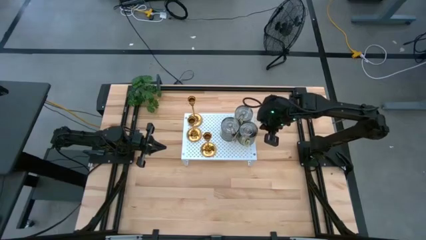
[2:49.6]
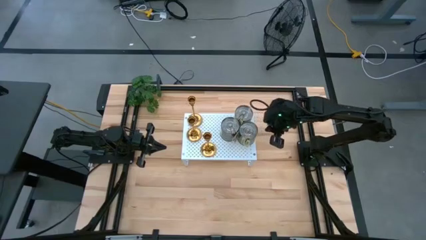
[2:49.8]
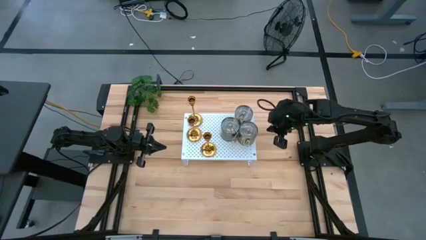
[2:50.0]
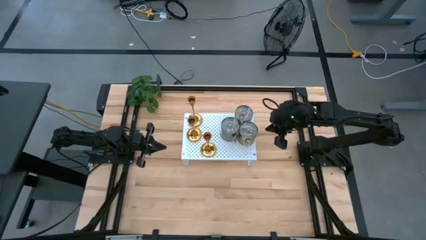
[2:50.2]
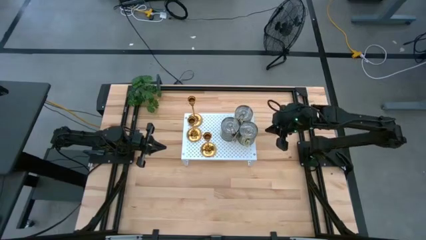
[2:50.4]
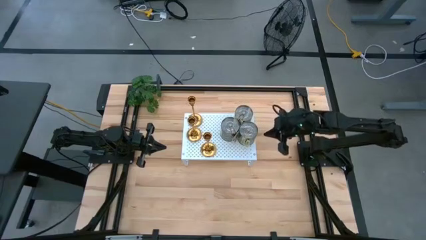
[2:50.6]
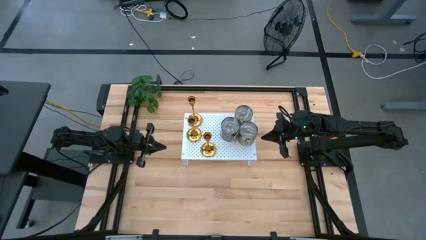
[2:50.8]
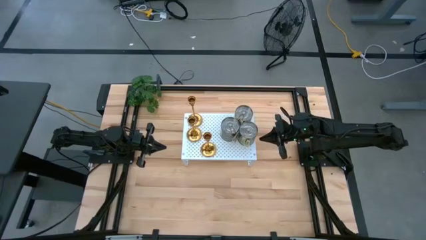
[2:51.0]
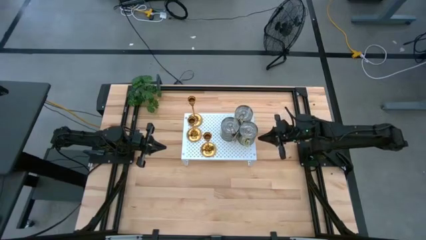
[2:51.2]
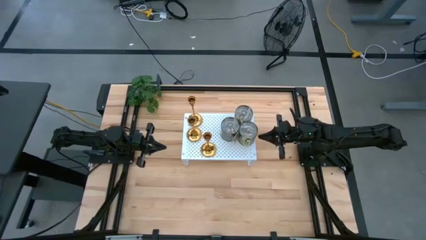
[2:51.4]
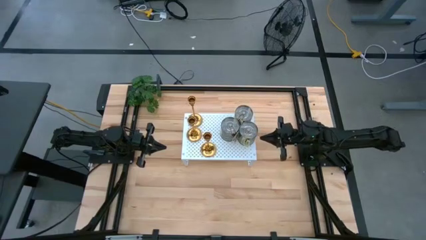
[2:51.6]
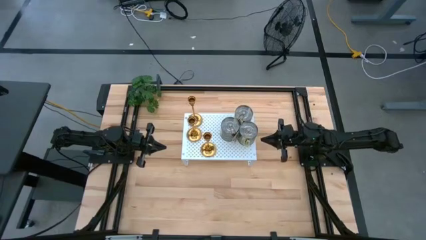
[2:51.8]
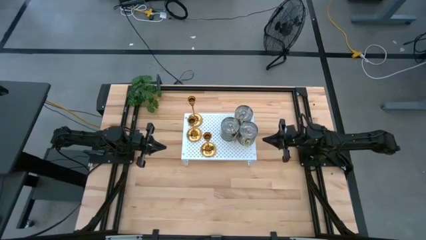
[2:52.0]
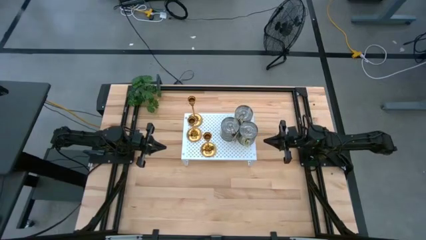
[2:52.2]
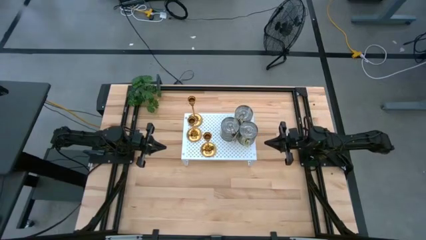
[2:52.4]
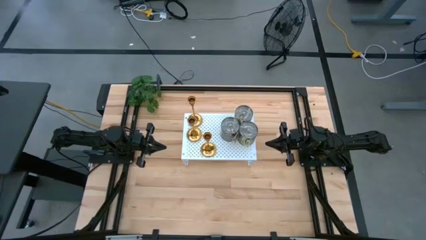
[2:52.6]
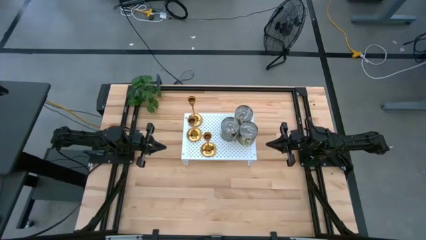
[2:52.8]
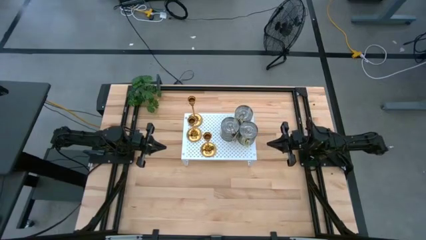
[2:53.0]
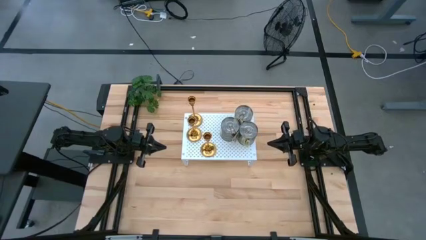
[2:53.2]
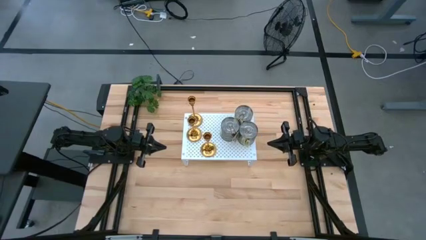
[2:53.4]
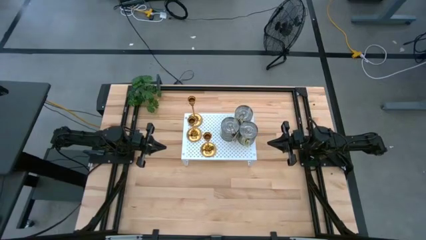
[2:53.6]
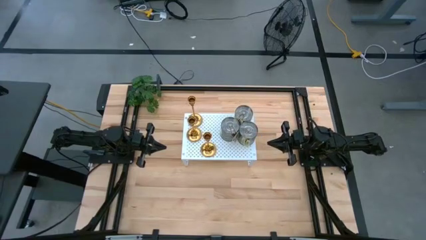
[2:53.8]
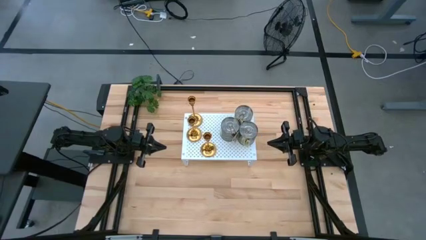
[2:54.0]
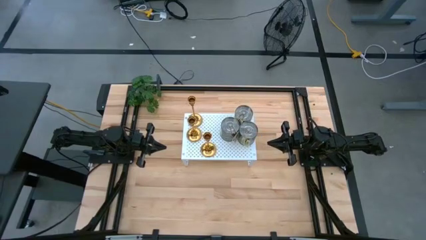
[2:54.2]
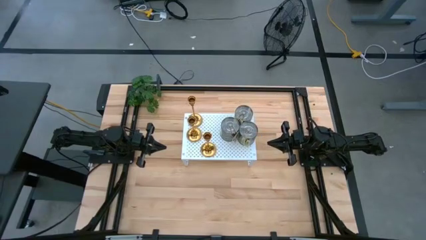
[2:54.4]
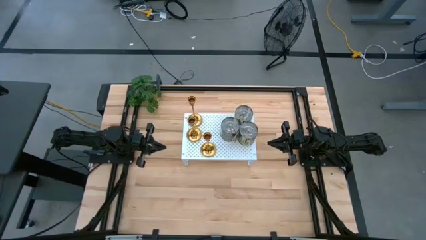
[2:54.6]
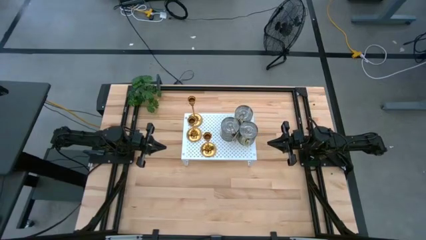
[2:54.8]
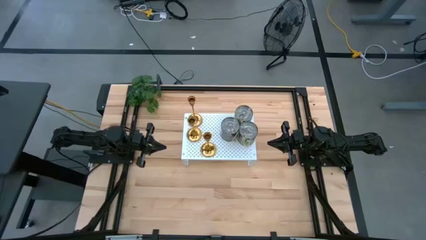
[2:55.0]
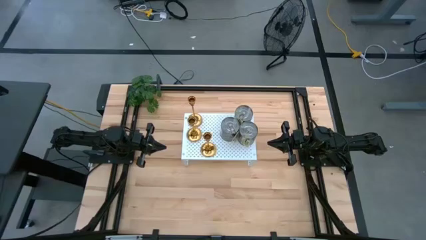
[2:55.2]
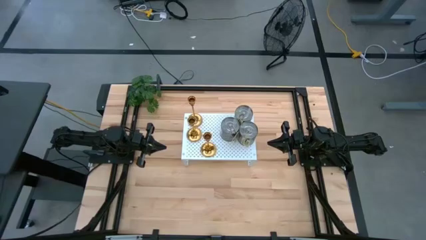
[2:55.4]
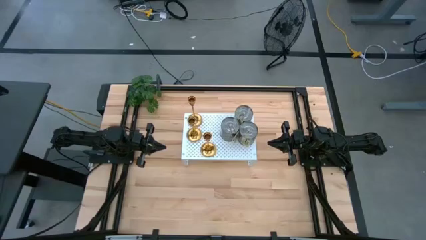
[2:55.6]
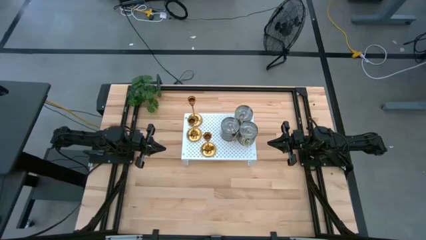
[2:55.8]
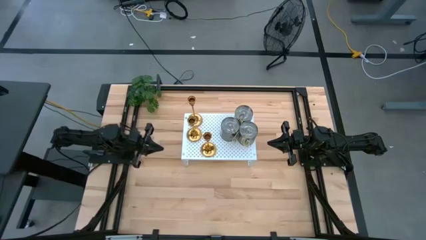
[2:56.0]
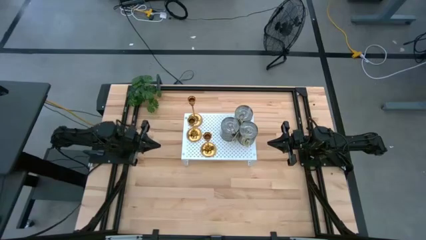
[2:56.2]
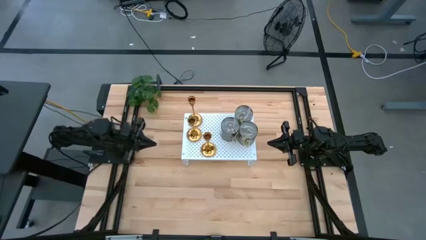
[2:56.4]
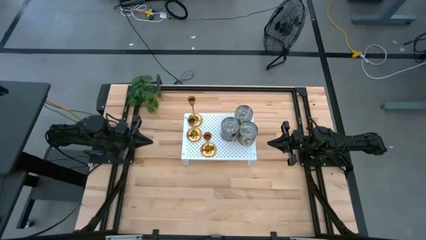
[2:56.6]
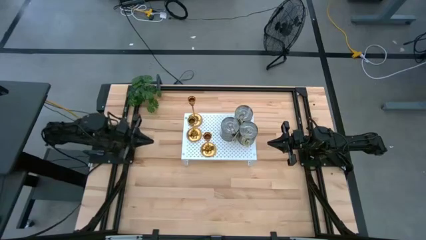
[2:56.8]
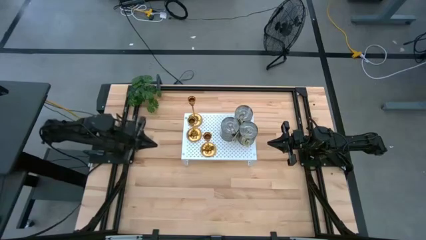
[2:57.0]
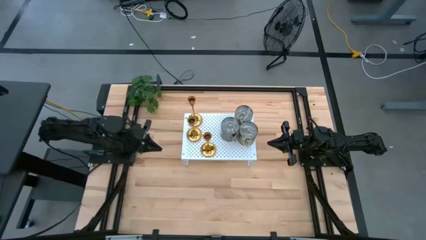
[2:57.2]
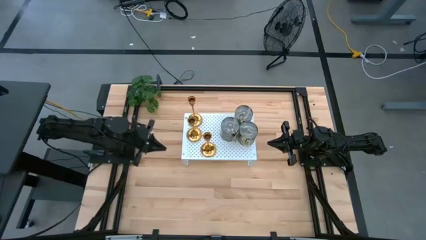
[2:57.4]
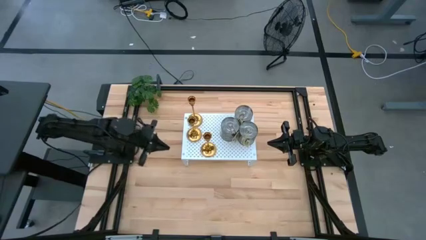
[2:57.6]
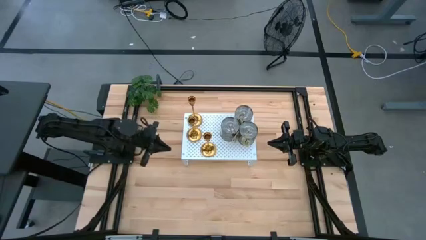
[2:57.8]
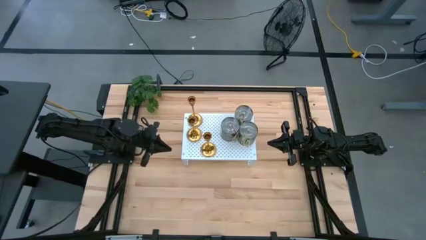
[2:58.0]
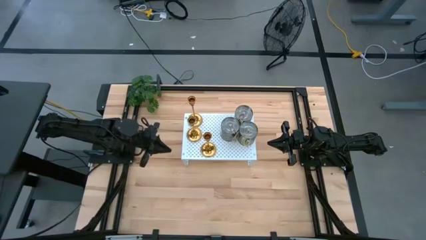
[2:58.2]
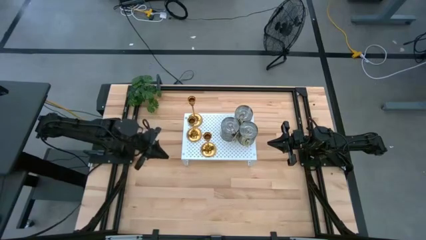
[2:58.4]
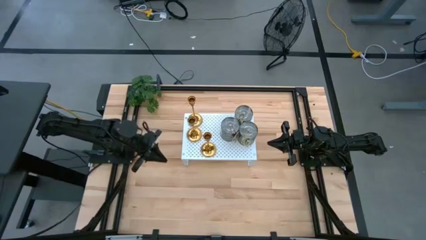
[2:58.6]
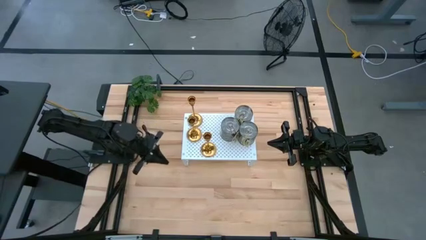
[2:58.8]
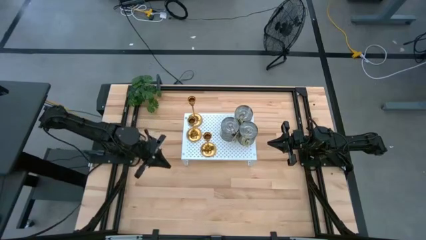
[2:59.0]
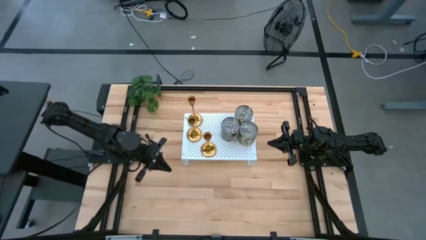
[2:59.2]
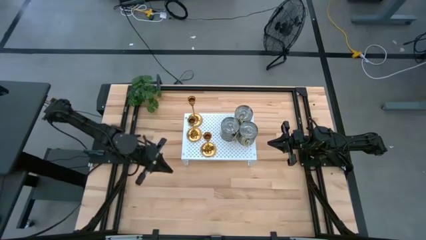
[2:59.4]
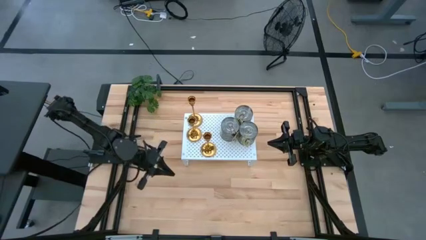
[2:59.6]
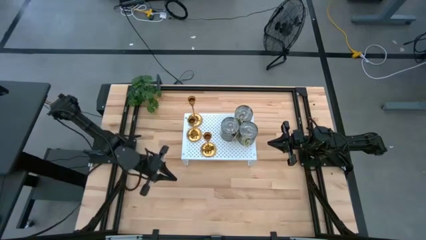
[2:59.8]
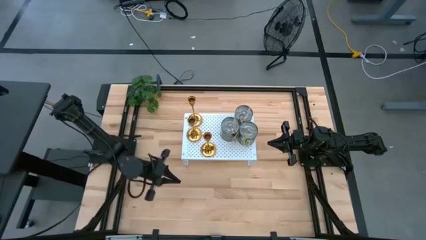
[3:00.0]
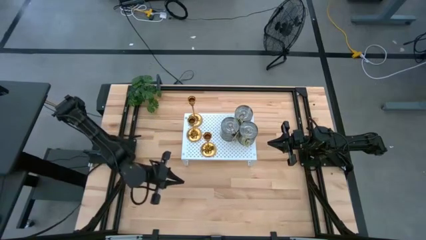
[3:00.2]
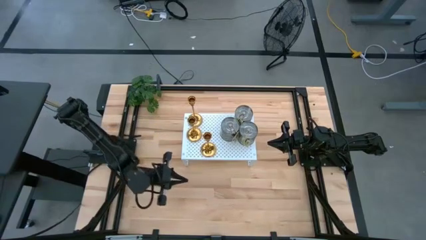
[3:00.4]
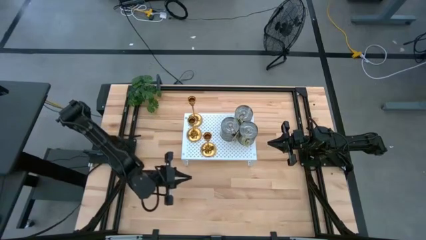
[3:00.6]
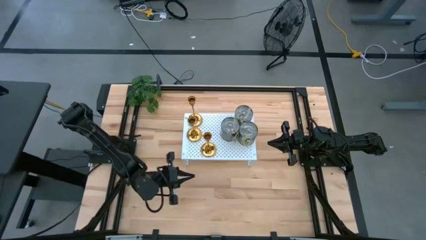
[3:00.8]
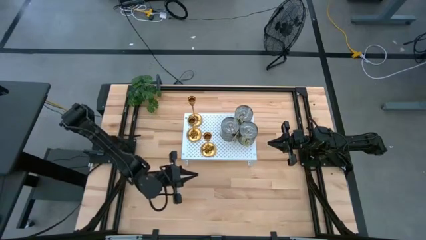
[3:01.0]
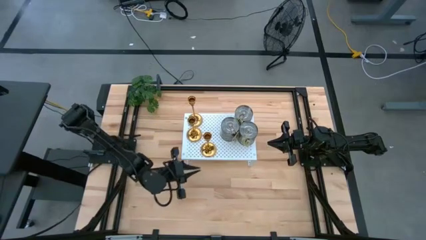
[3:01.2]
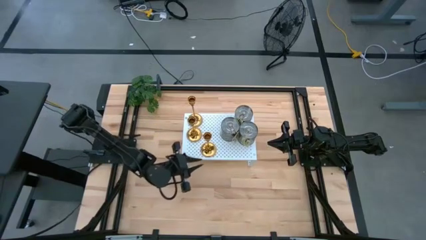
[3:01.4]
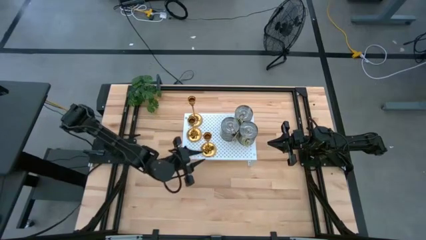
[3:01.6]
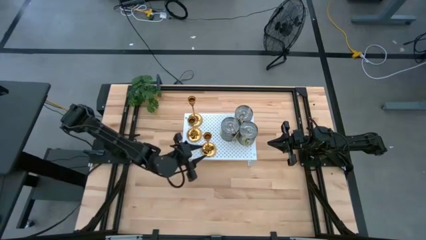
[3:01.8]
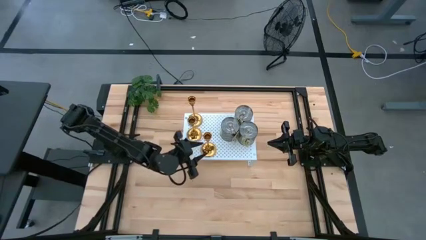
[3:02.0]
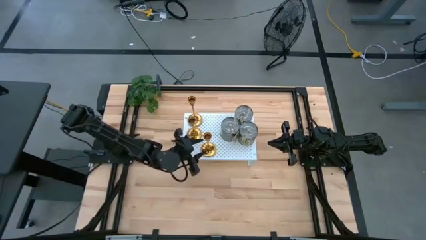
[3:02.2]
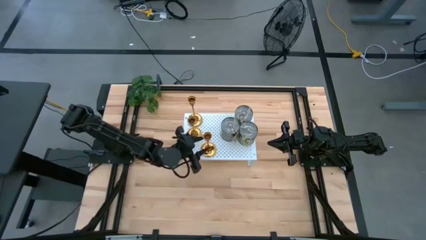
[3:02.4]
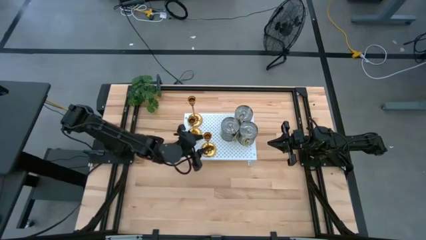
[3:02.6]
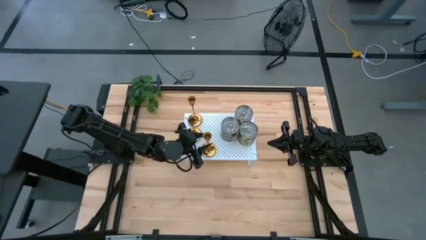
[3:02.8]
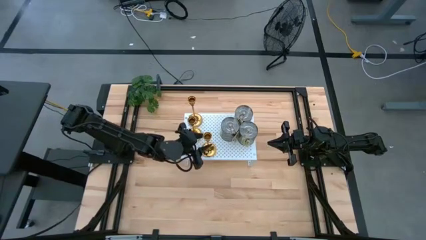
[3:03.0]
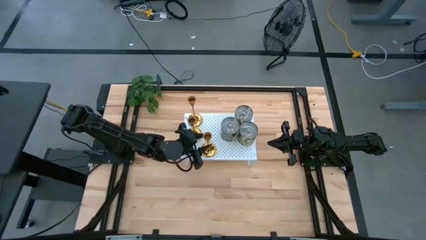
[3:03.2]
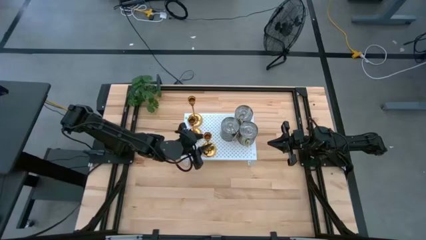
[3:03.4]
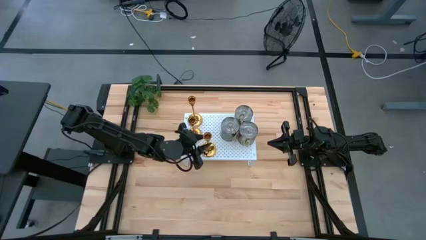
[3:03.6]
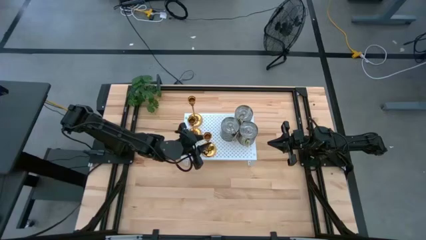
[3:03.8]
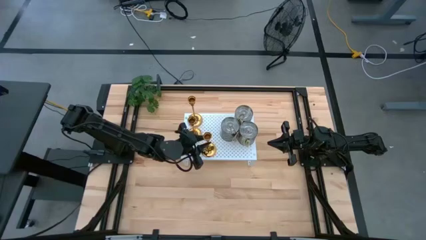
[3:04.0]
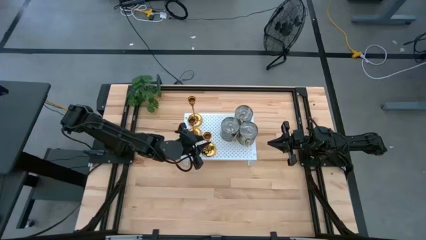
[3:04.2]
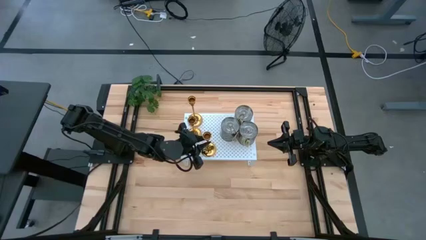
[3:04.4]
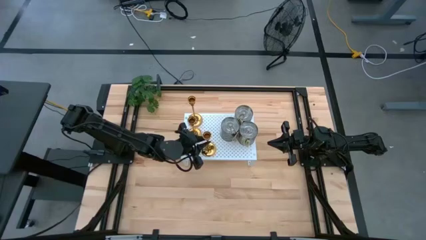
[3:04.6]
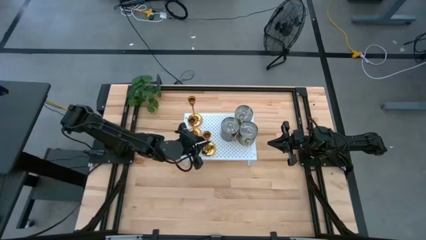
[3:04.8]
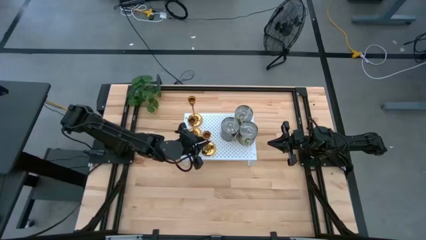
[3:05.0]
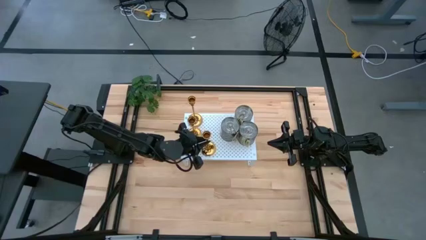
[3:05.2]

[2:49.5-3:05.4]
Task: Pick & Place candle stick holders
Return to Home Position

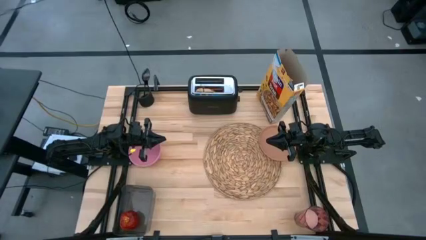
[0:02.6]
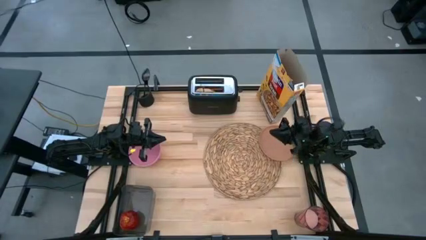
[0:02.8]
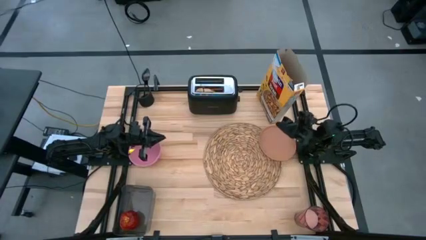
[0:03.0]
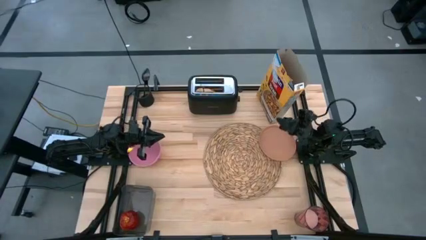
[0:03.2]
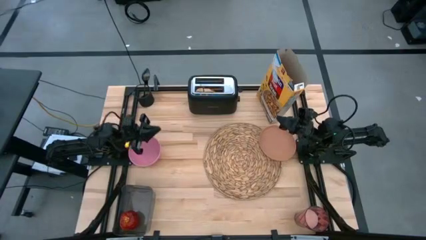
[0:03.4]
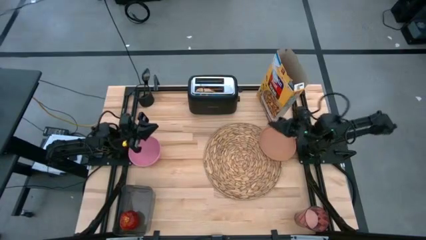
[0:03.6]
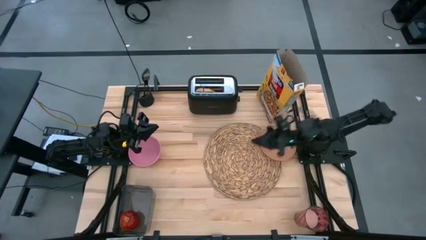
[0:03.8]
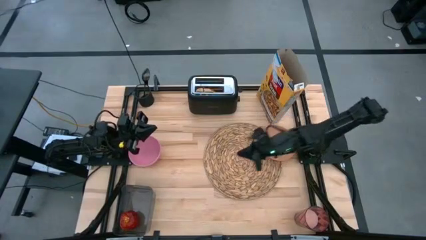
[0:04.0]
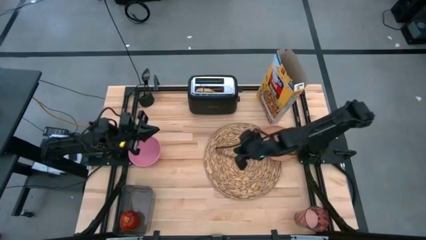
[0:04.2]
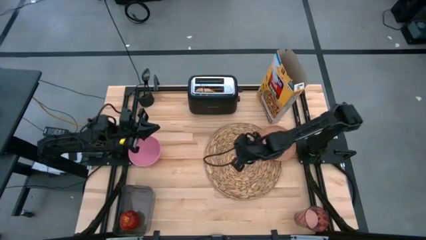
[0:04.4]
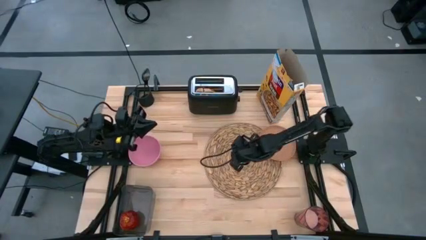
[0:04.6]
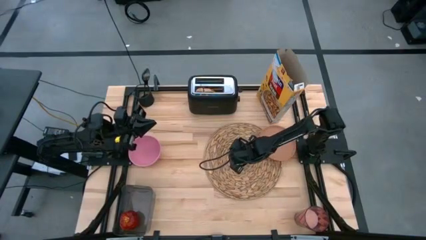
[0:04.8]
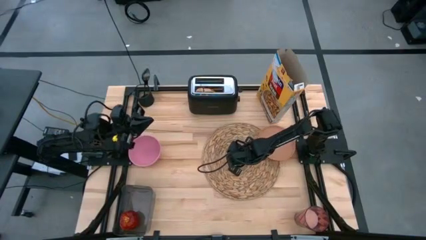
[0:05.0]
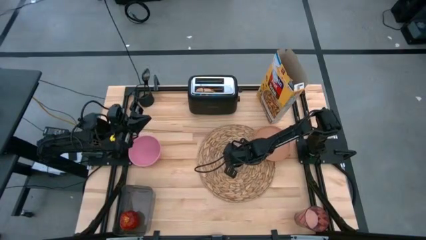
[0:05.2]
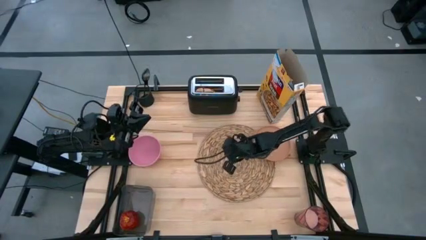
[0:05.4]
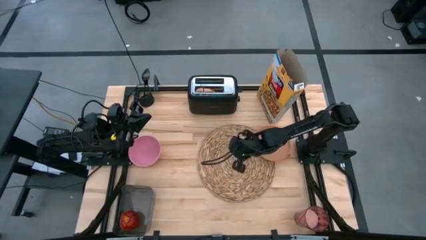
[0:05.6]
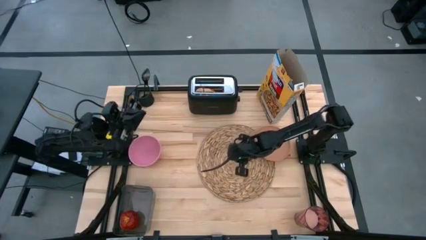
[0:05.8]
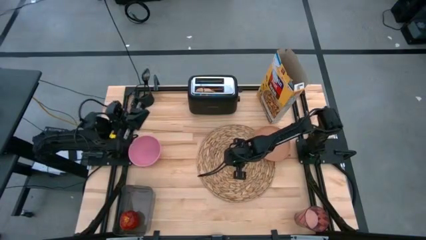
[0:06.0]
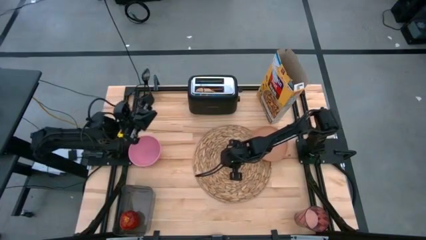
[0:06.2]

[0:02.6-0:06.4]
Task: Arrange a breakfast setting
Adjust the brown placemat
